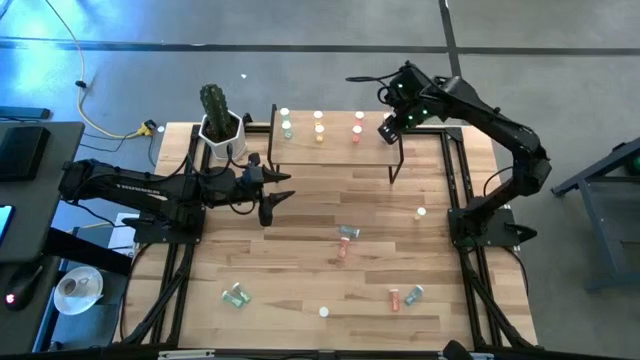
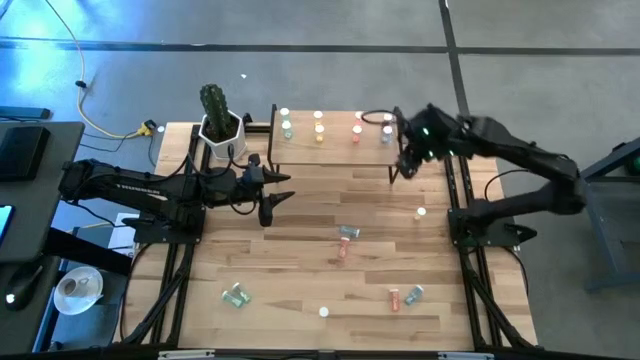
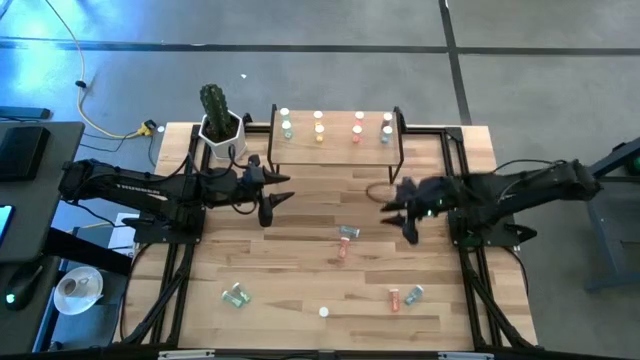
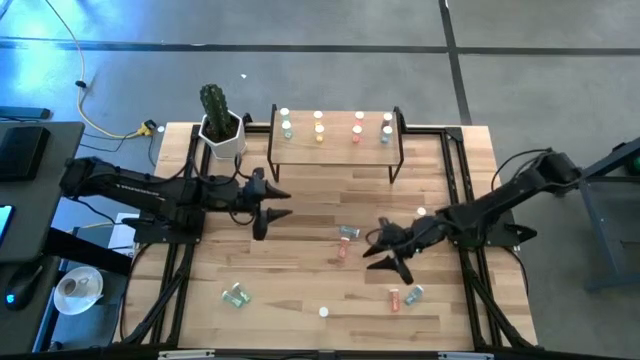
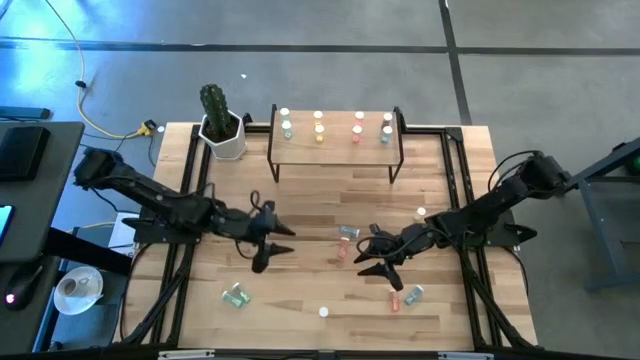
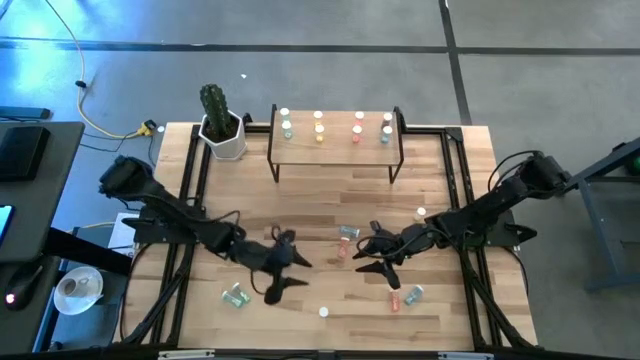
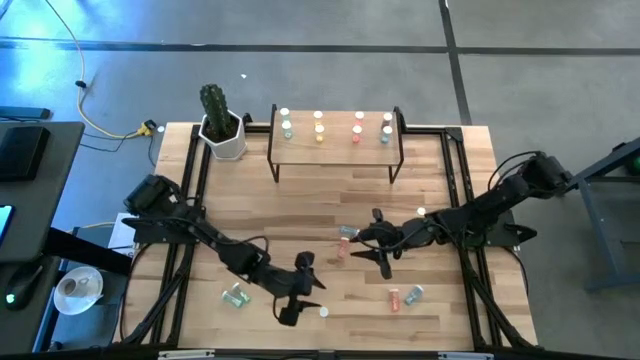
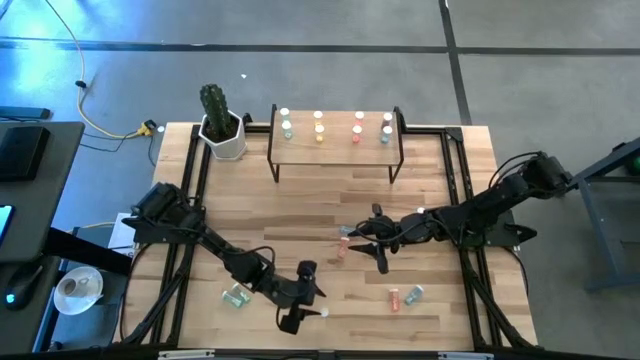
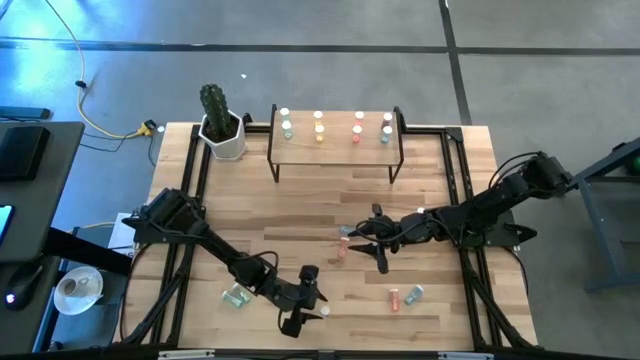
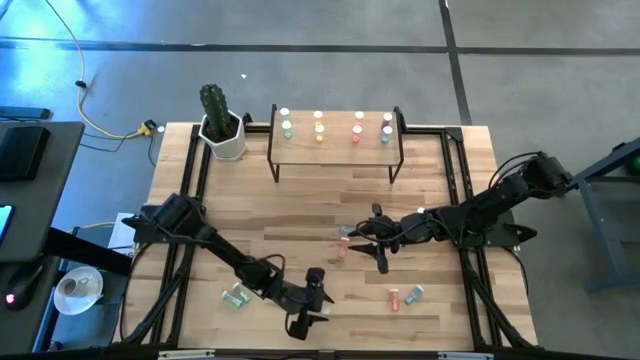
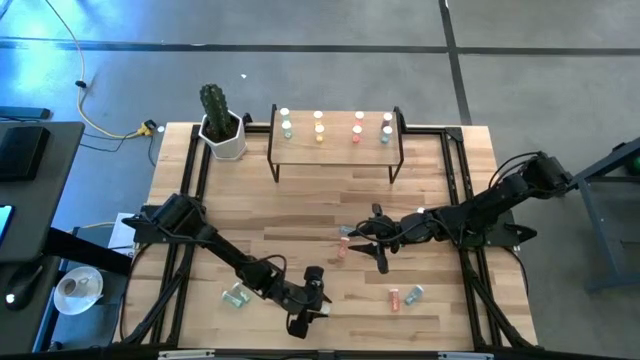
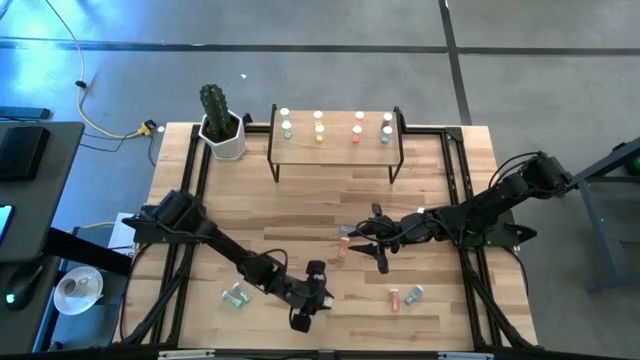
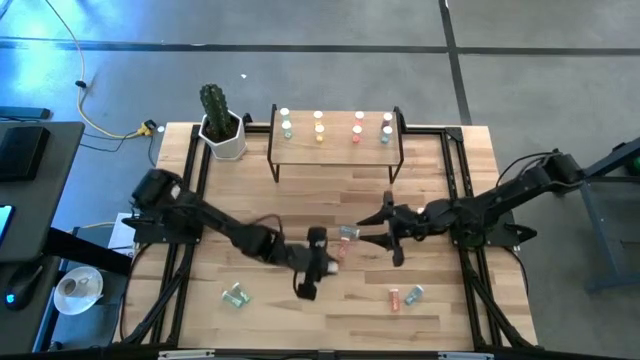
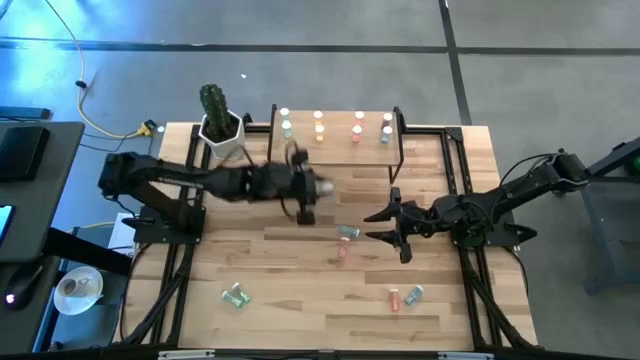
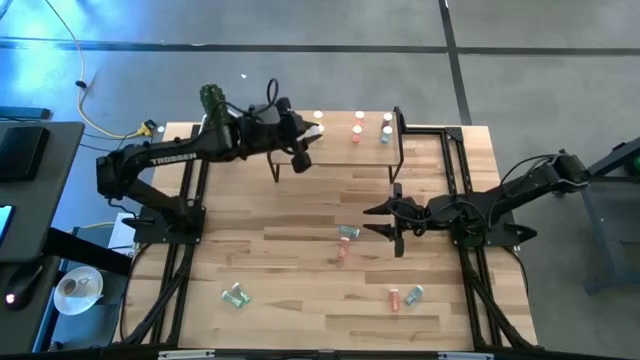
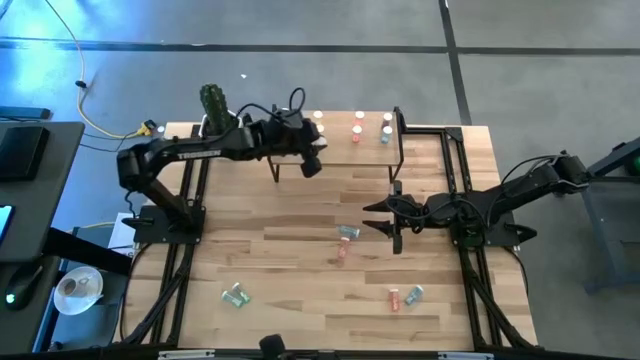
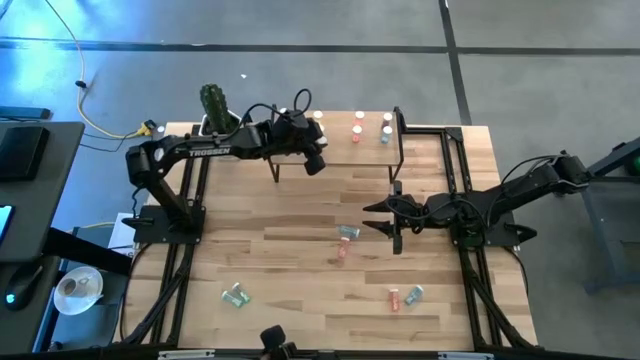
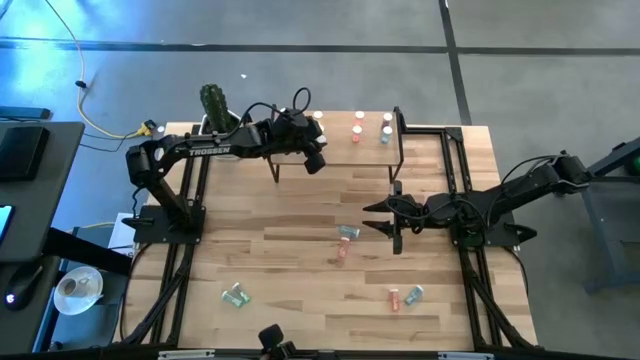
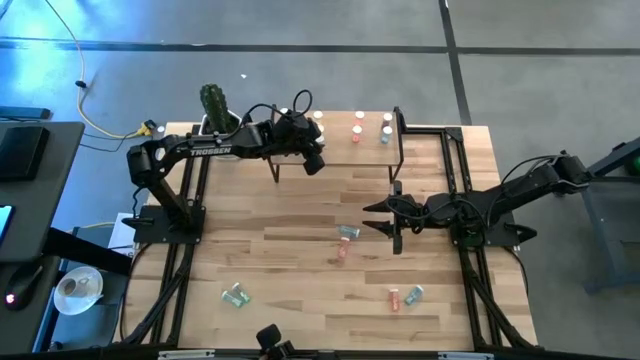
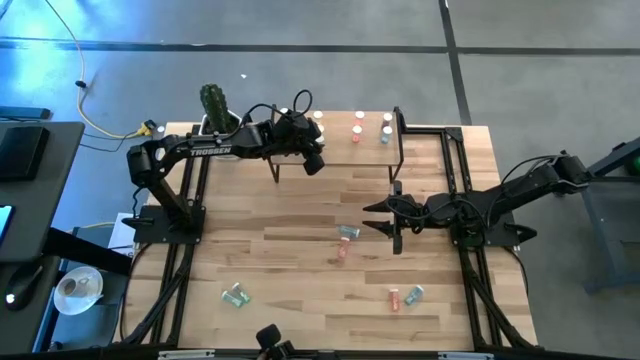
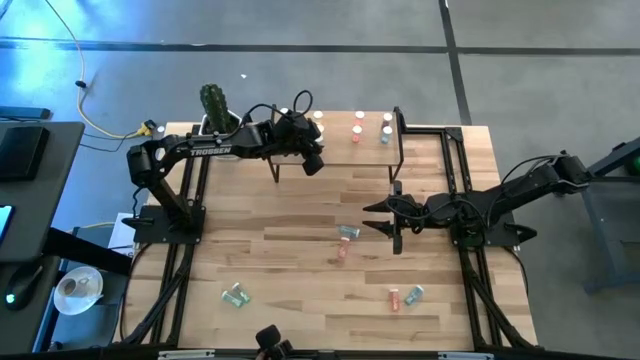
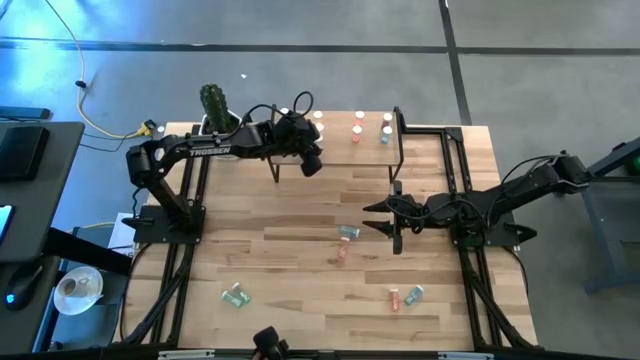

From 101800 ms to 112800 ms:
Task: Pick and place medicine bottles onto shelf by color
Put the yellow pill bottle on the shelf aligned with the other yellow pill bottle

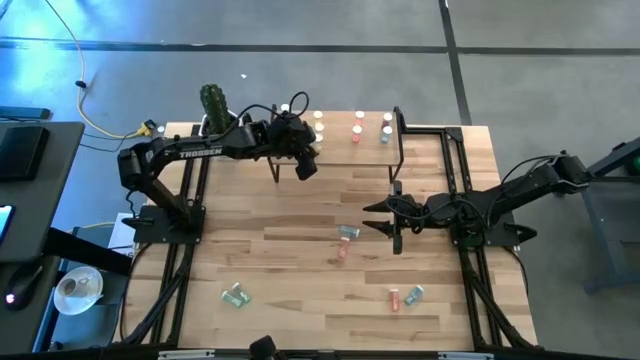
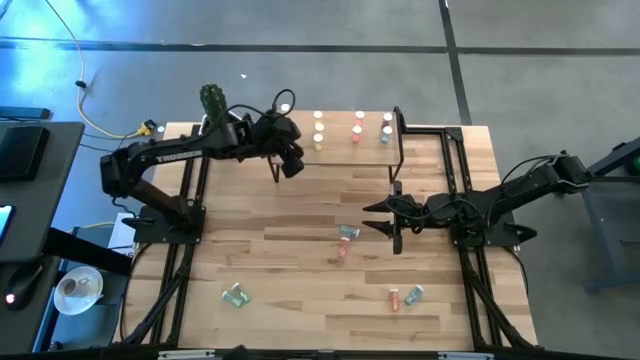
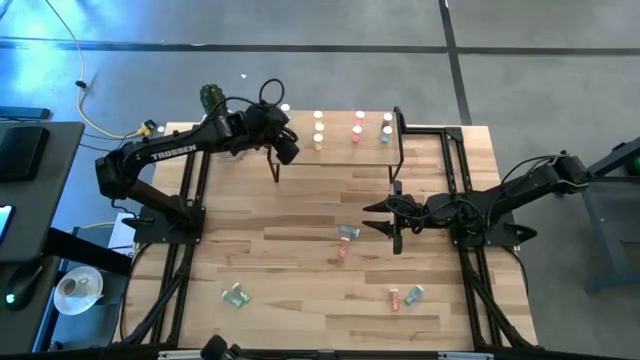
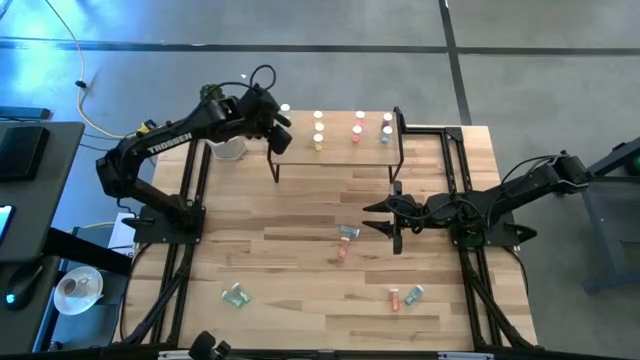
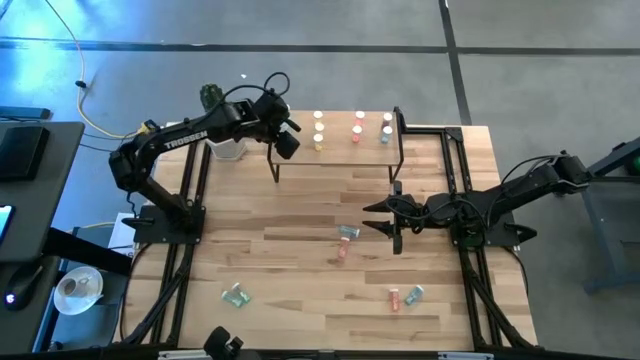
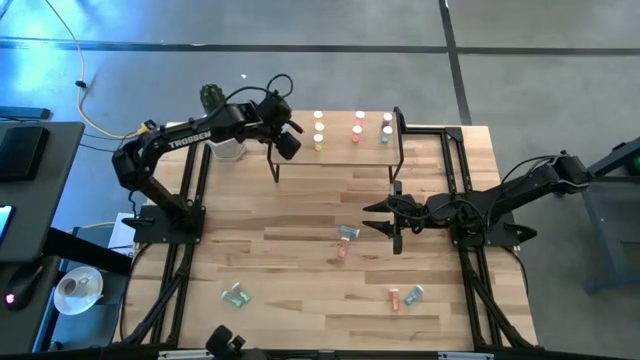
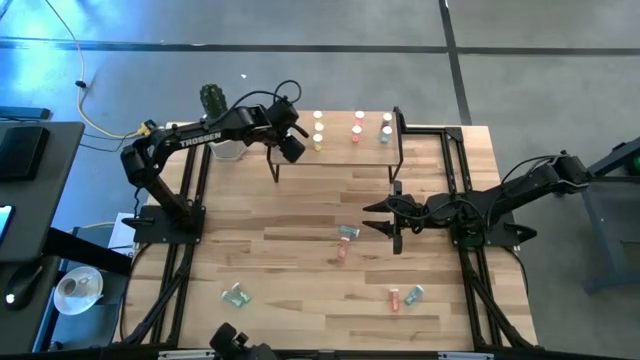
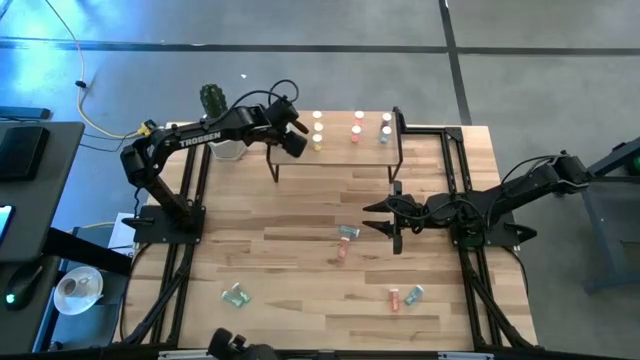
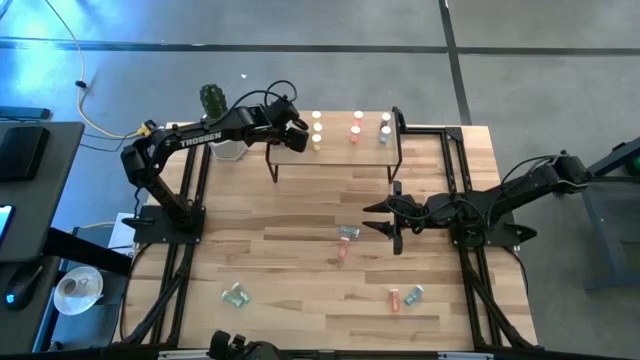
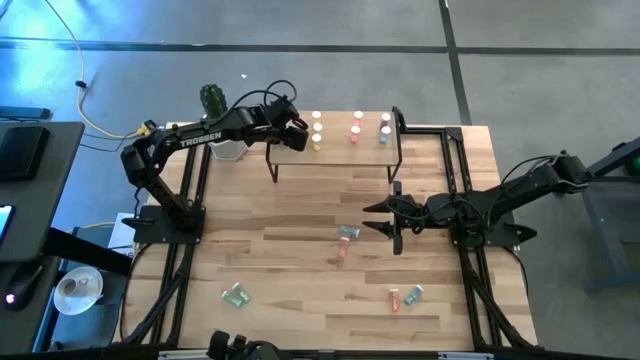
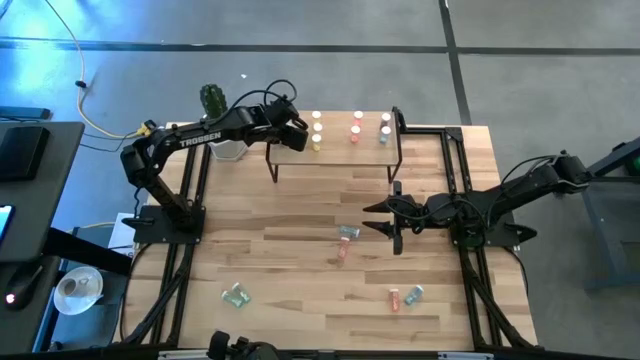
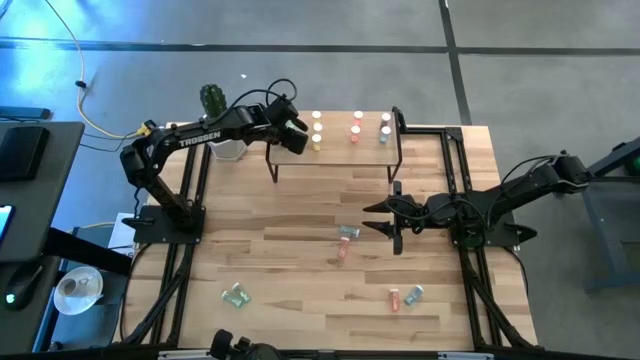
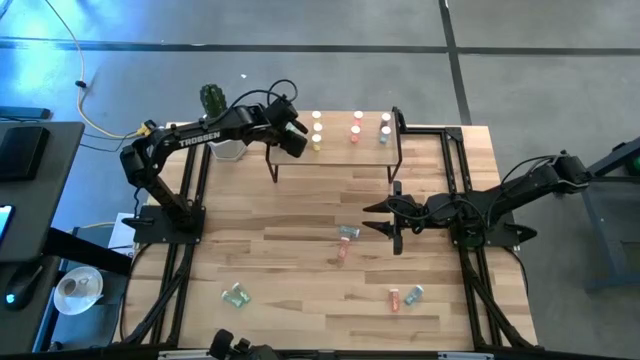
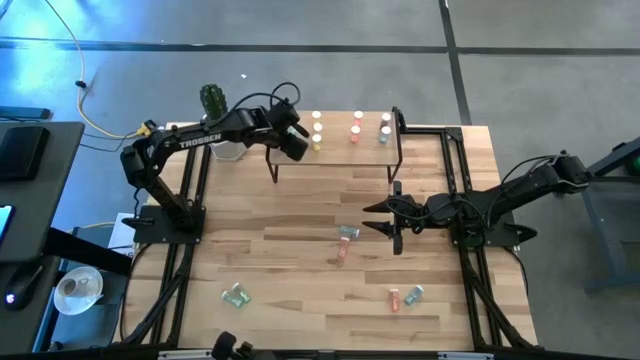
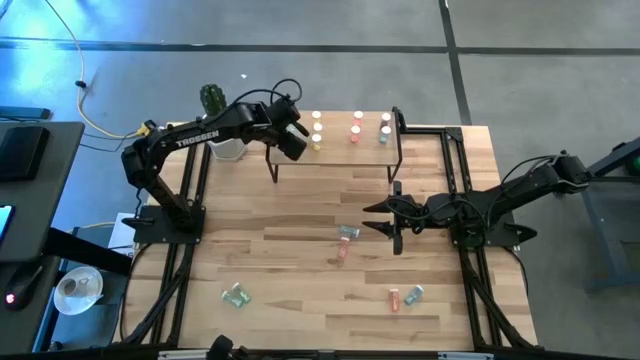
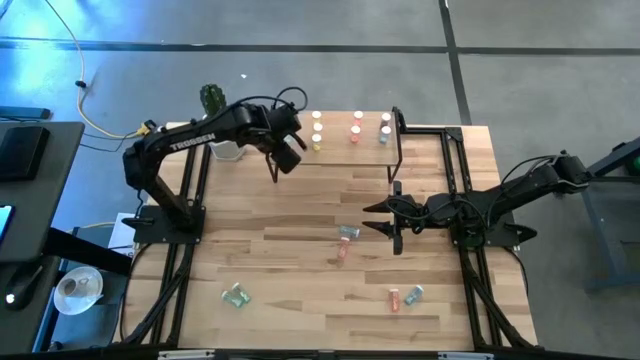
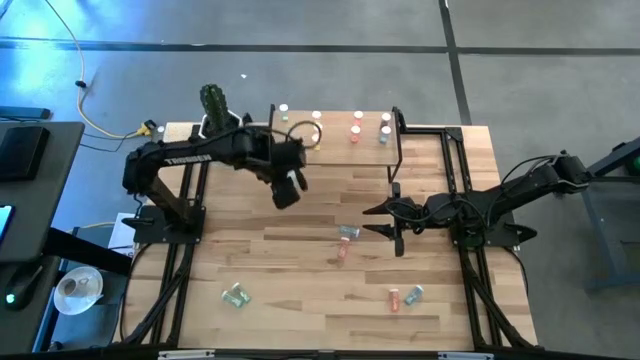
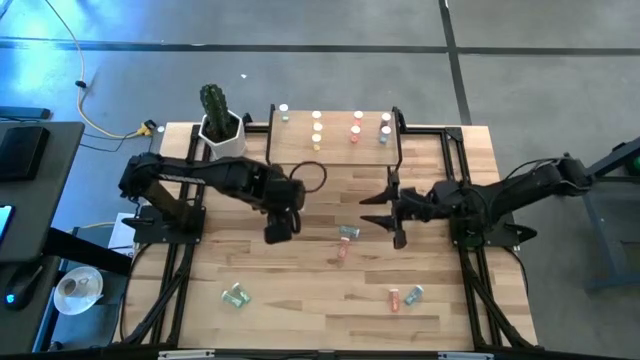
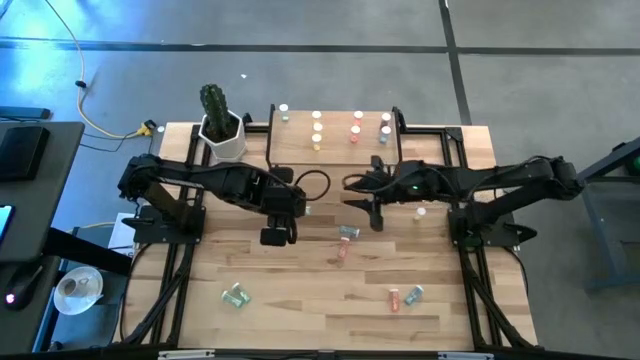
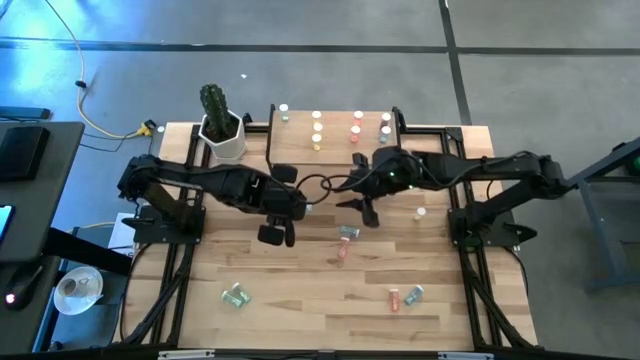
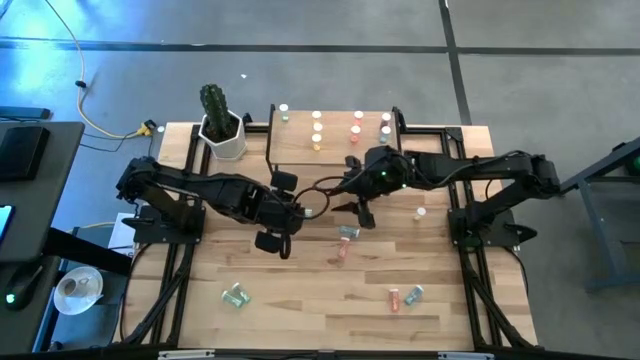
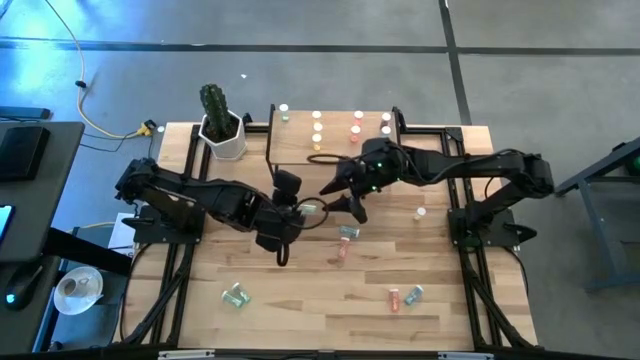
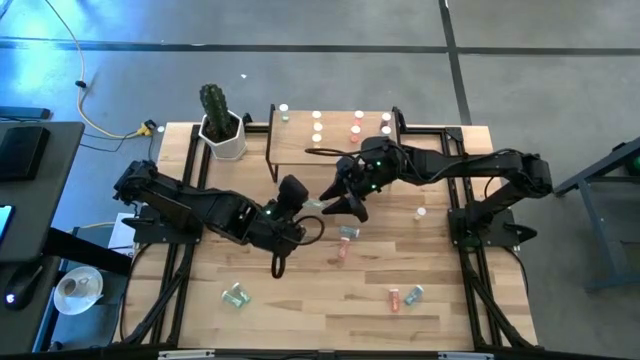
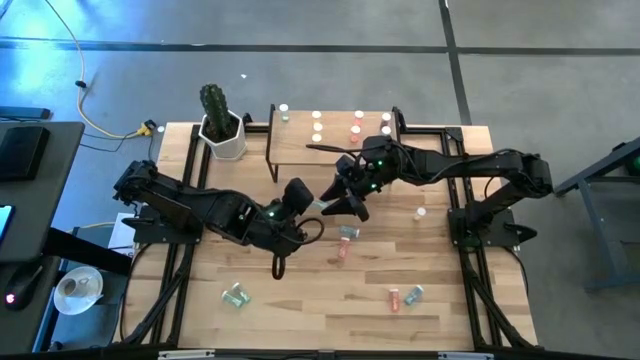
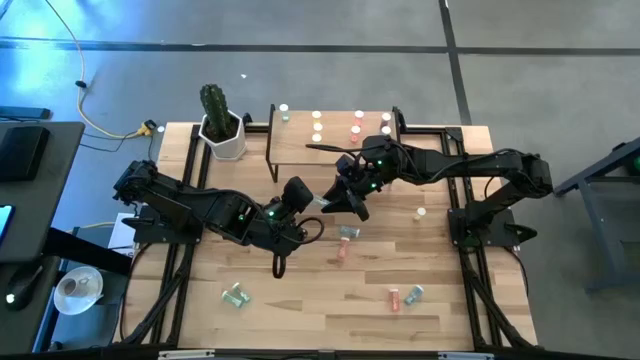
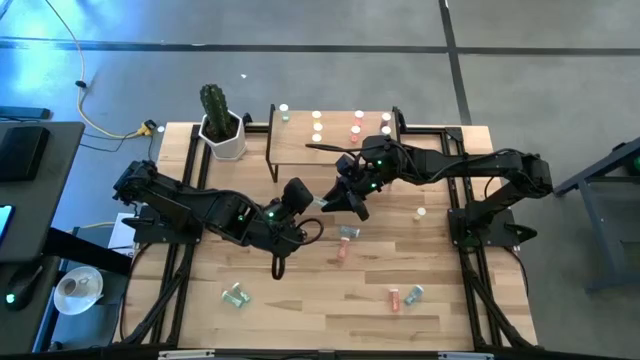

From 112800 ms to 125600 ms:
Adjust the light blue pill bottle on the shelf
